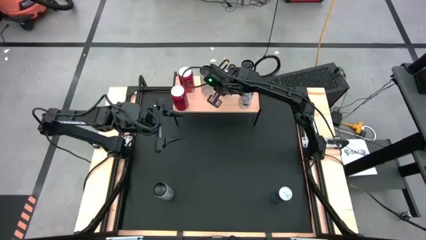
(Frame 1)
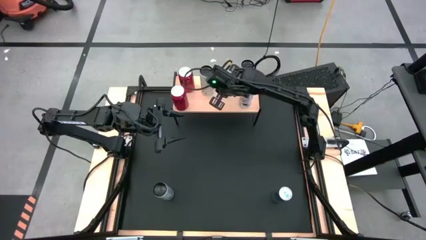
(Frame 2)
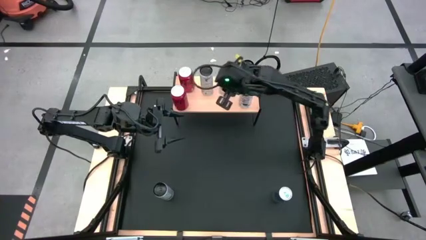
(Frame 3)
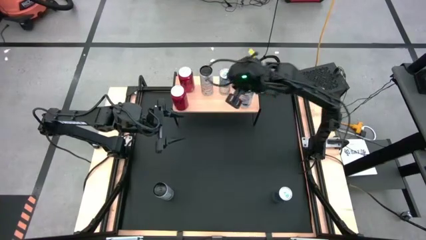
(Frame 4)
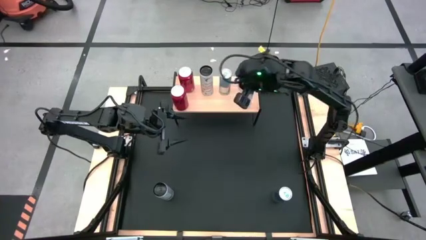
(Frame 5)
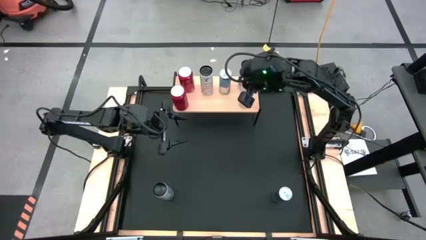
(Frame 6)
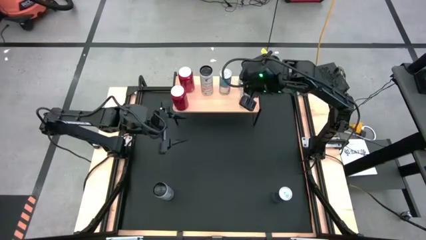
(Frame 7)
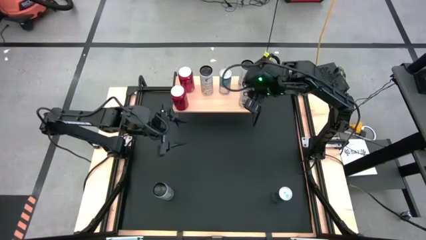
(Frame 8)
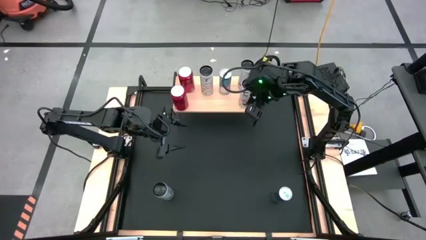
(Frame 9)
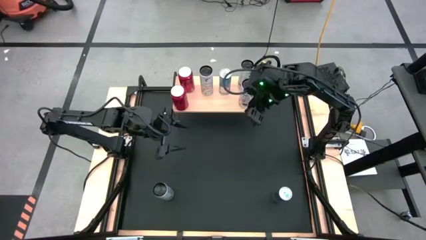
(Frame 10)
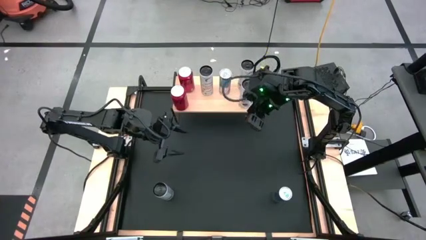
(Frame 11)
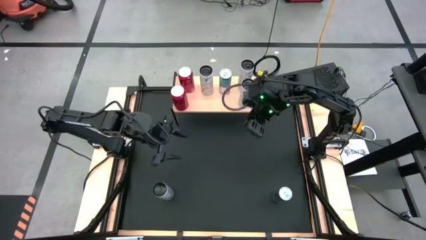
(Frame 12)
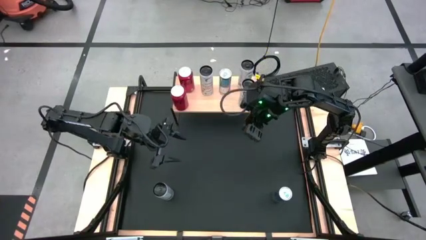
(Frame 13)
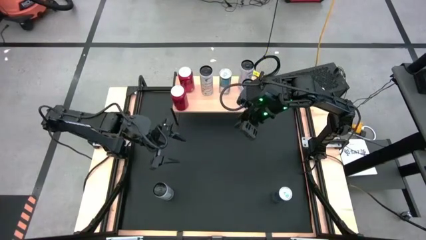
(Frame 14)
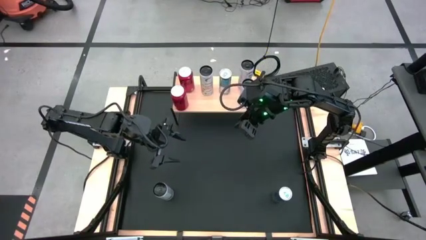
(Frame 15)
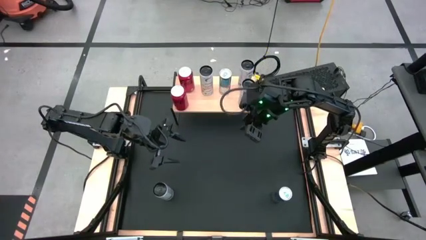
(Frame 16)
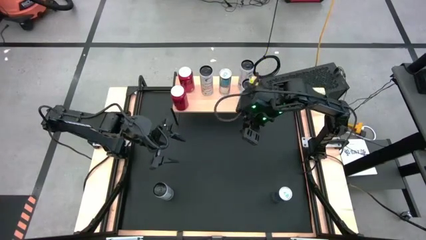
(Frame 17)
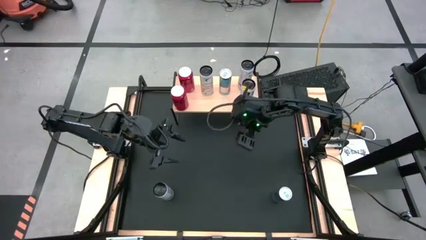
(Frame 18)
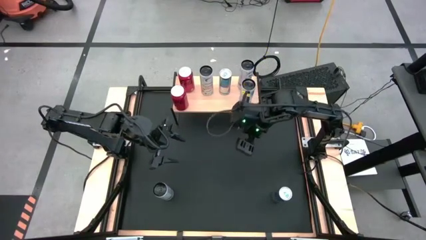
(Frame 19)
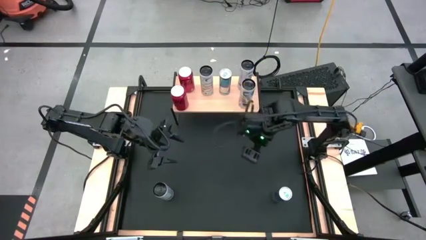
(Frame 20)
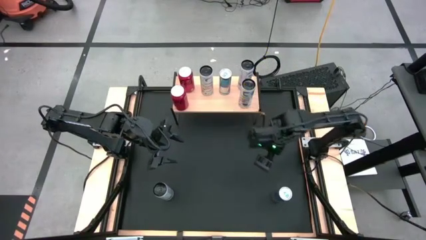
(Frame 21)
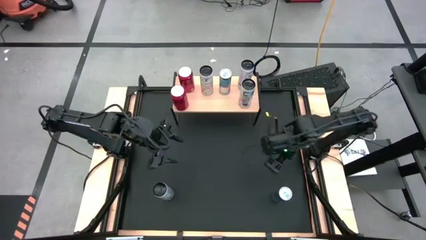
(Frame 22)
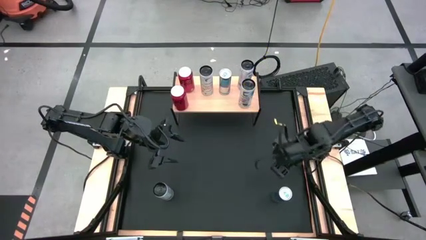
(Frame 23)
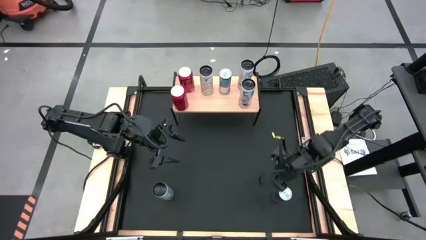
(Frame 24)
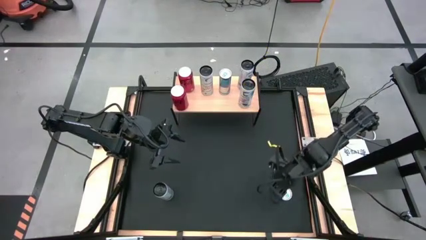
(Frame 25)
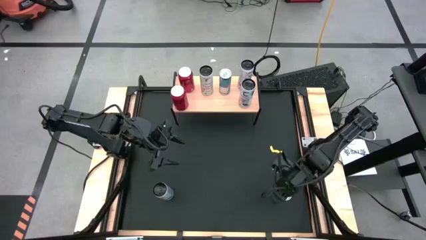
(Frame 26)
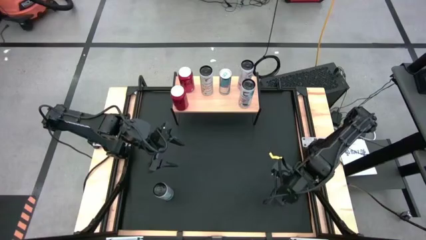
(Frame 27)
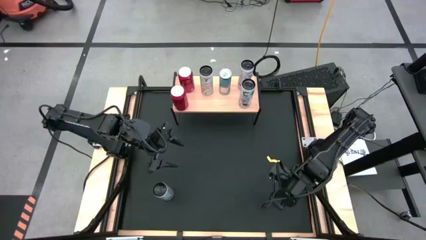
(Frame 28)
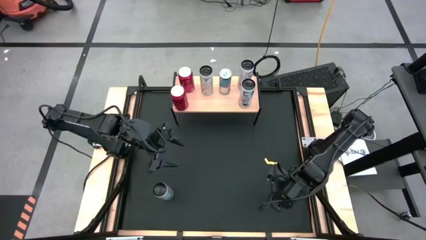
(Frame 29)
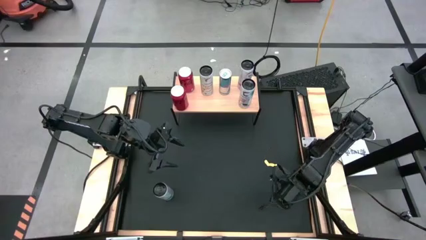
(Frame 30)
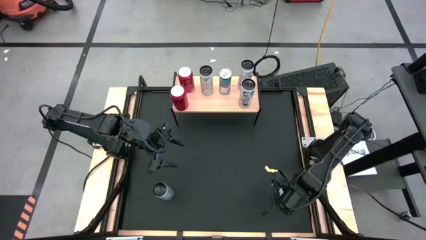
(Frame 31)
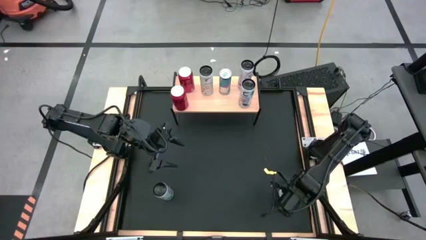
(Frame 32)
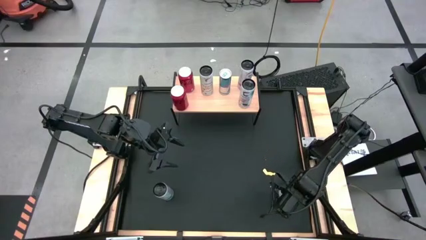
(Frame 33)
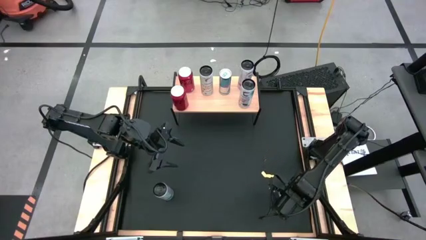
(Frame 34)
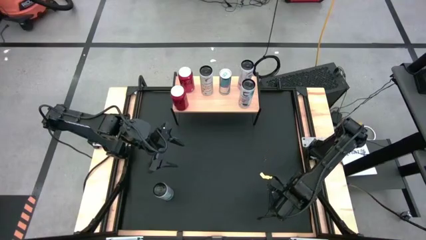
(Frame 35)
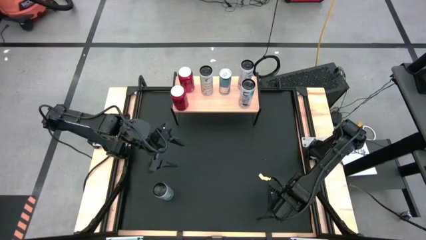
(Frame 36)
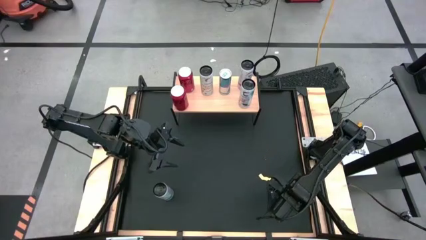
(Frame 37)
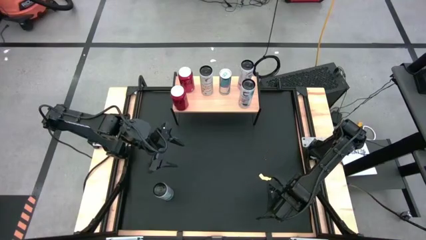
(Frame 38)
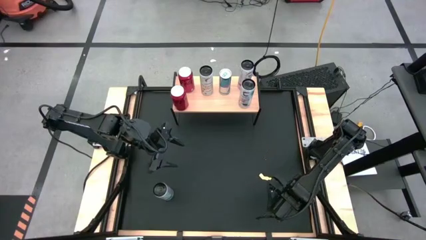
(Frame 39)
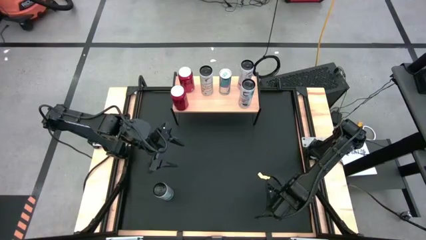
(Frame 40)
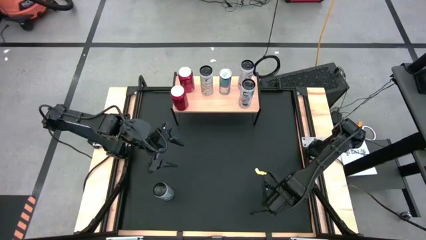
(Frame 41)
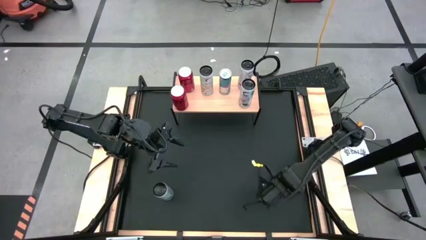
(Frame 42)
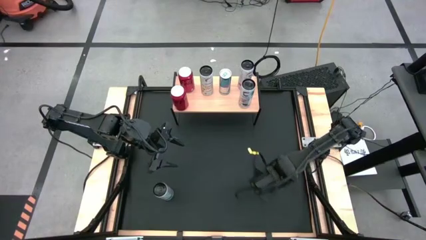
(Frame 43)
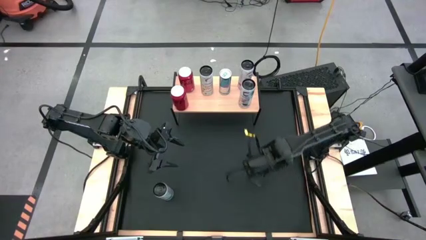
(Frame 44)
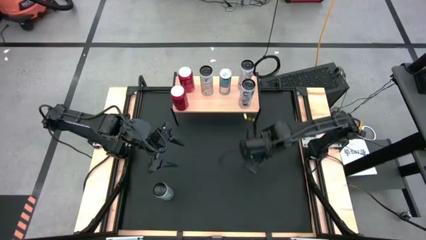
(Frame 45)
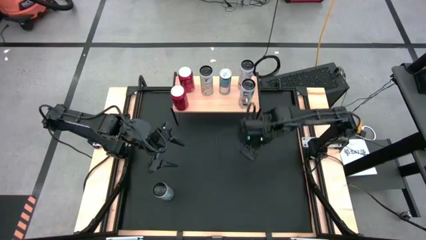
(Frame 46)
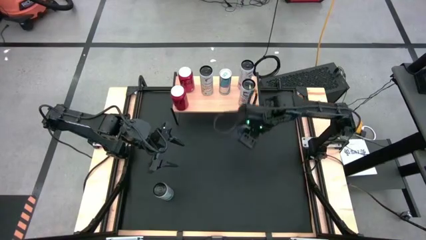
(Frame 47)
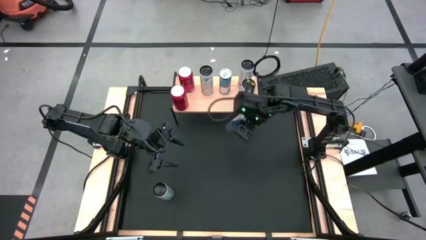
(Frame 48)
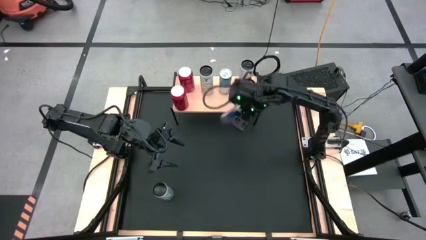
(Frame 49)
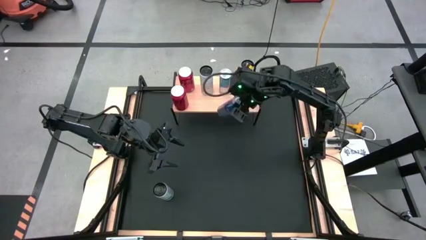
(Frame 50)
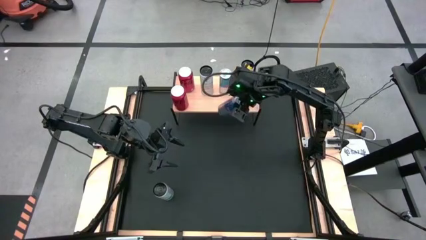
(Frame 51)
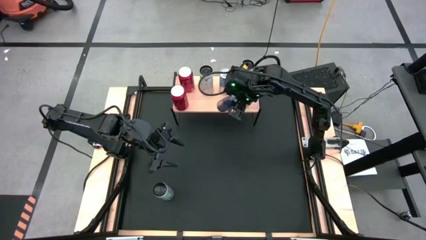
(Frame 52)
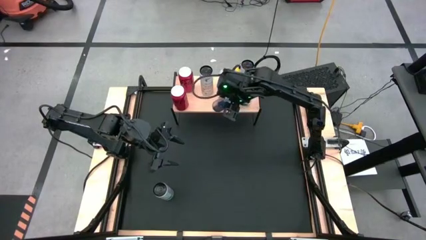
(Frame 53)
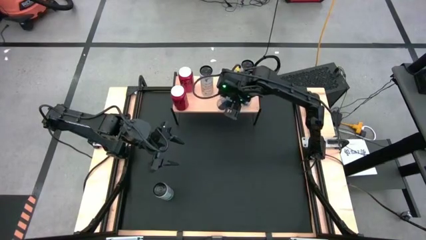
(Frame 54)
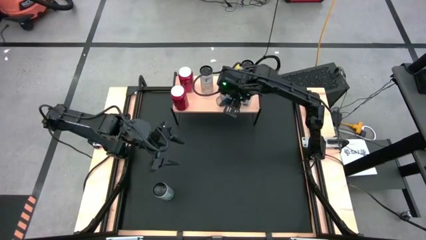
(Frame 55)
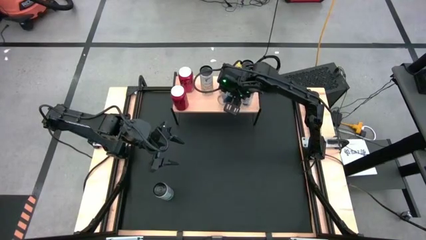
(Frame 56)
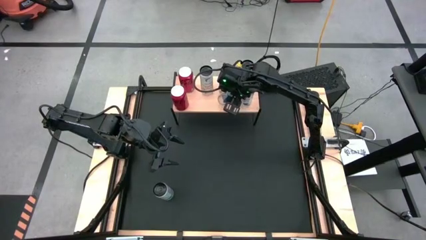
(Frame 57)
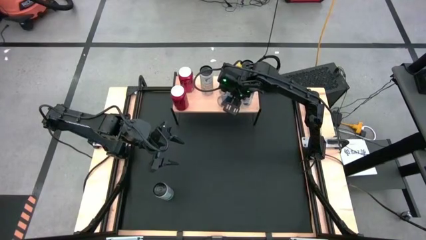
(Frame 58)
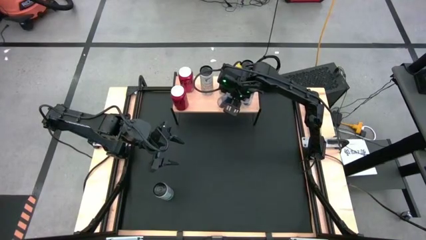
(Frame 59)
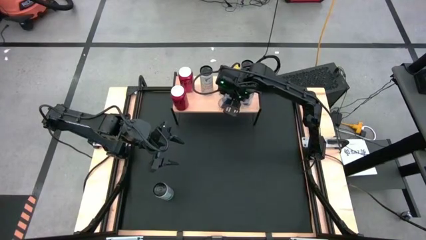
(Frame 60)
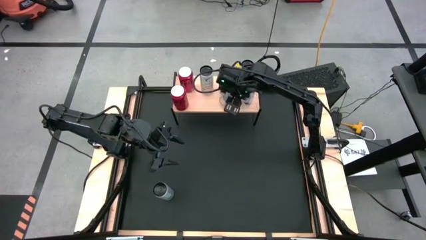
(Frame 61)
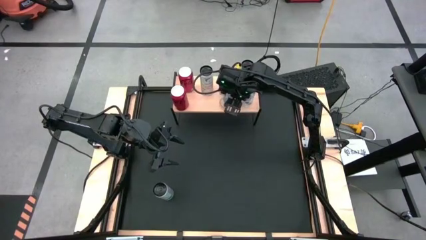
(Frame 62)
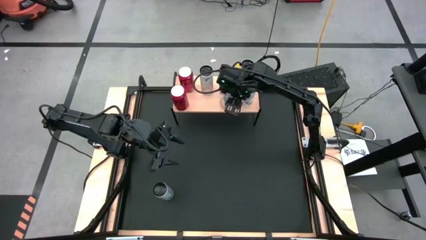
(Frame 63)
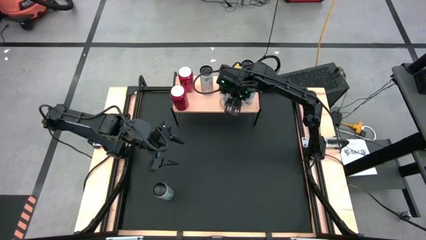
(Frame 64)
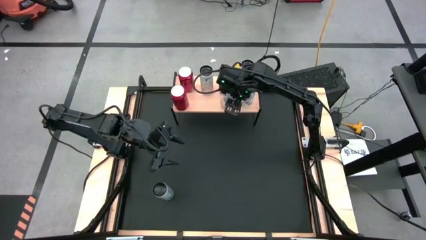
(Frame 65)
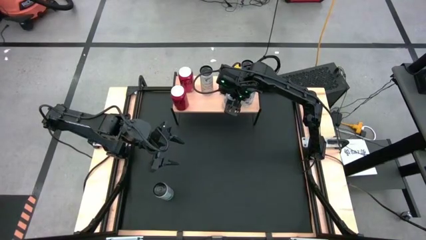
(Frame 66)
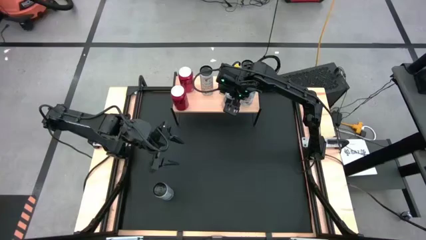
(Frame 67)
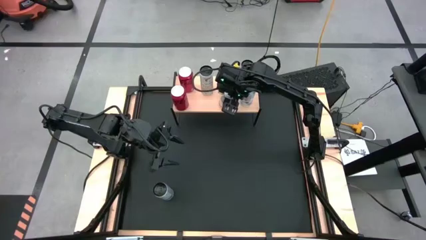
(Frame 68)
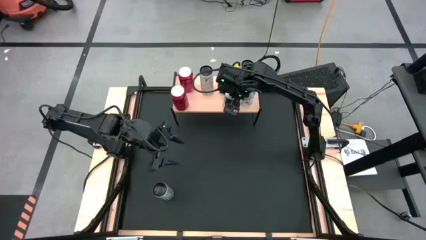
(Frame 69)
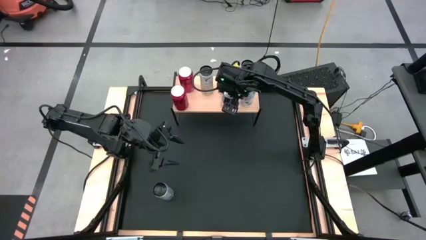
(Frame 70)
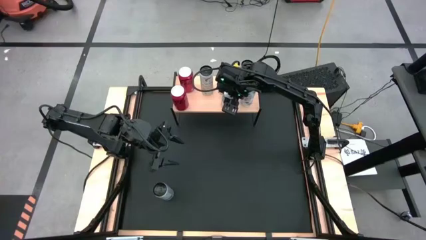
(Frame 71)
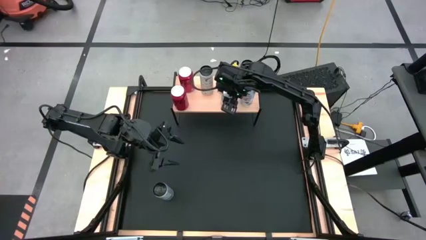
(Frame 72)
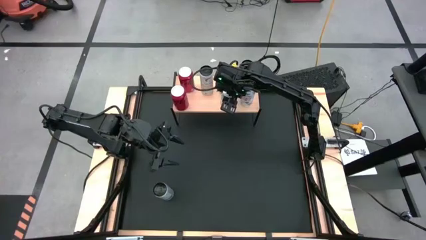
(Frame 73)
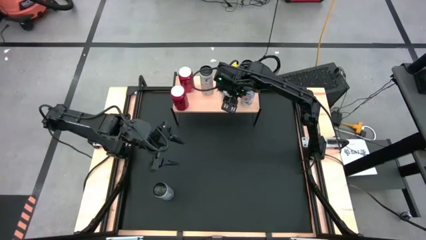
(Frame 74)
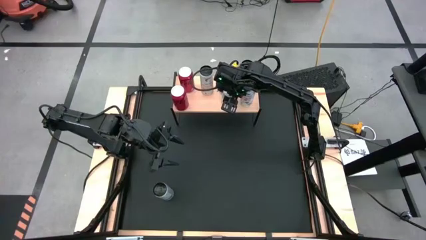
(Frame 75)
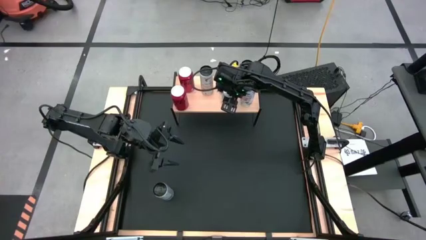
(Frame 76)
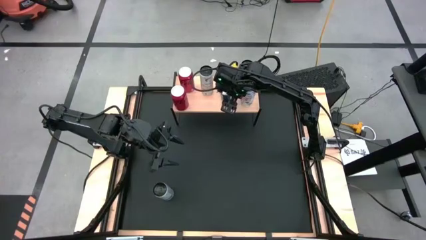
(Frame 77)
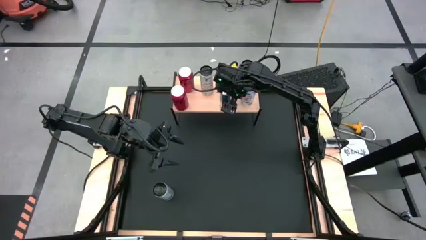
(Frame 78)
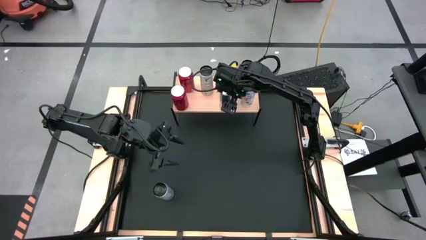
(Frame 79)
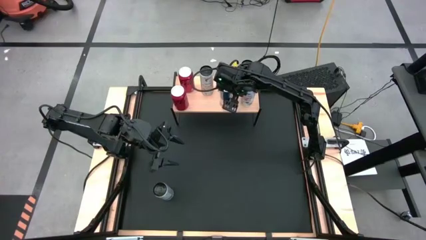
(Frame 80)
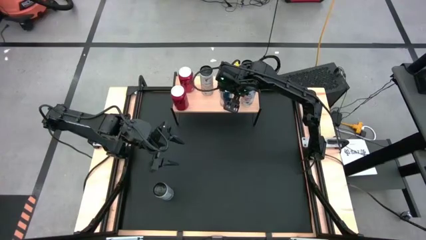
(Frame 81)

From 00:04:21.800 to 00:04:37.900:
Task: Place canned beverage on shelf
Put the blue soda can on the shelf aligned with the other blue soda can
